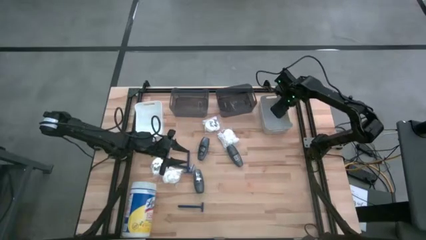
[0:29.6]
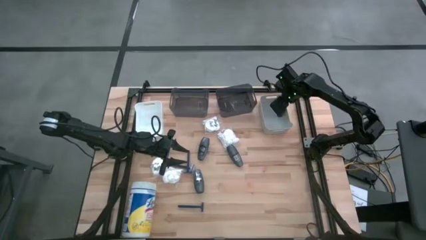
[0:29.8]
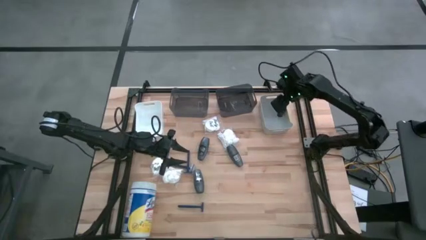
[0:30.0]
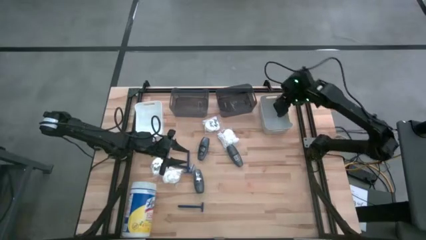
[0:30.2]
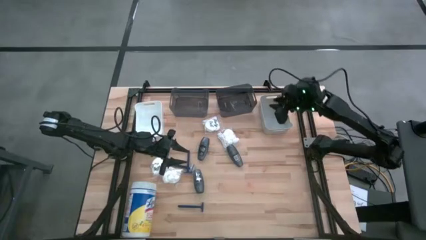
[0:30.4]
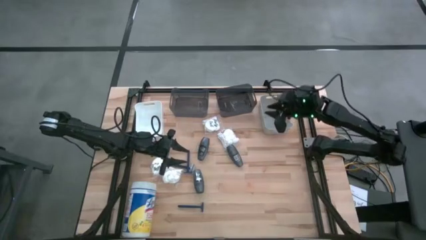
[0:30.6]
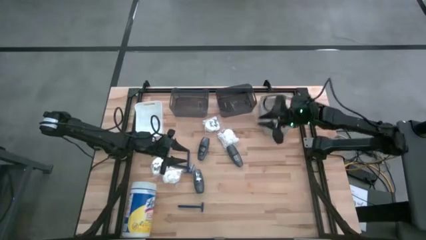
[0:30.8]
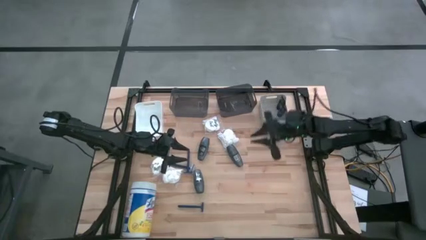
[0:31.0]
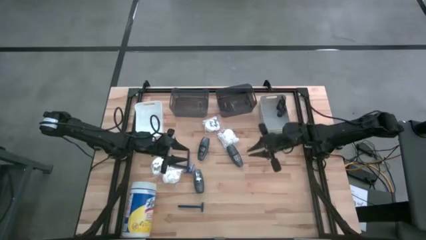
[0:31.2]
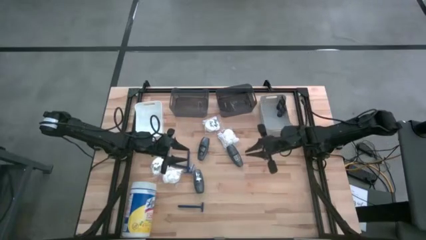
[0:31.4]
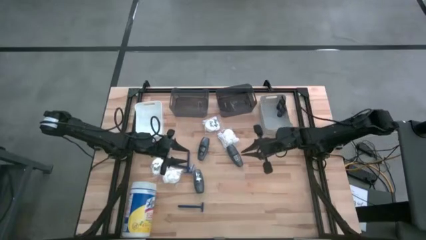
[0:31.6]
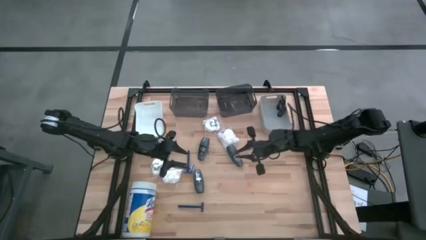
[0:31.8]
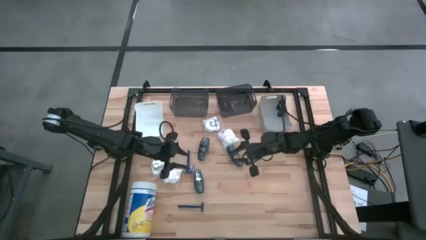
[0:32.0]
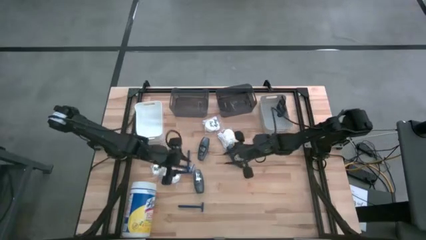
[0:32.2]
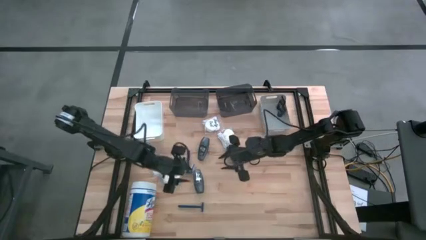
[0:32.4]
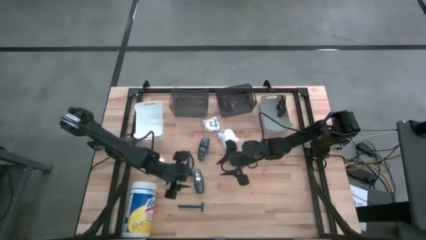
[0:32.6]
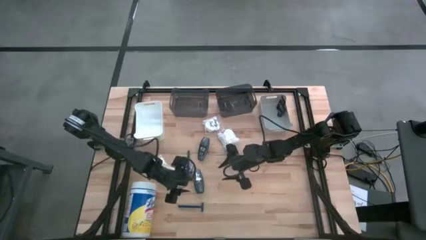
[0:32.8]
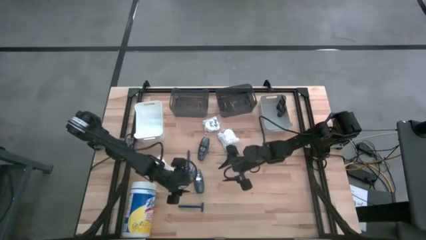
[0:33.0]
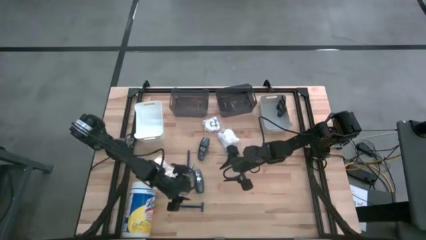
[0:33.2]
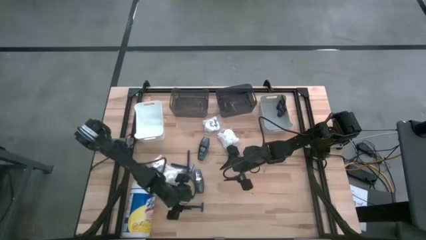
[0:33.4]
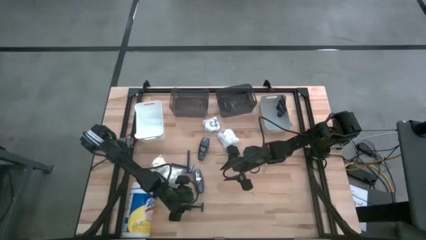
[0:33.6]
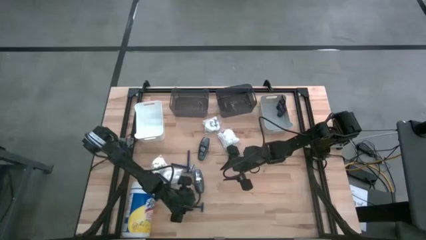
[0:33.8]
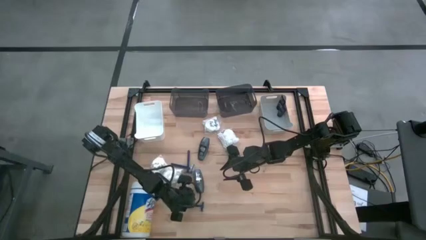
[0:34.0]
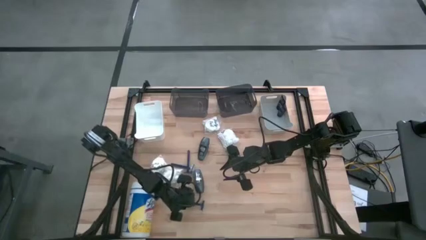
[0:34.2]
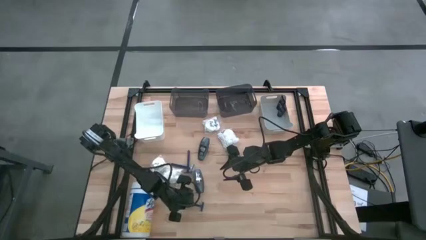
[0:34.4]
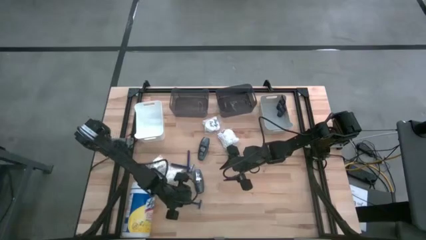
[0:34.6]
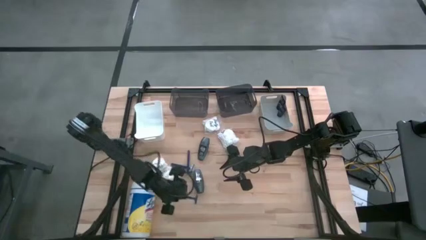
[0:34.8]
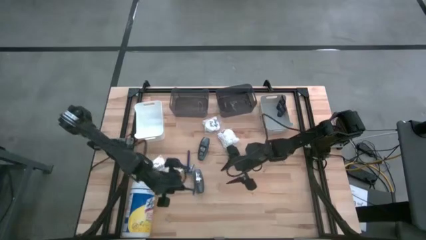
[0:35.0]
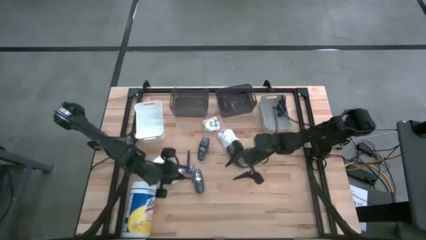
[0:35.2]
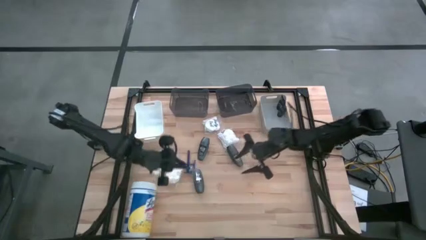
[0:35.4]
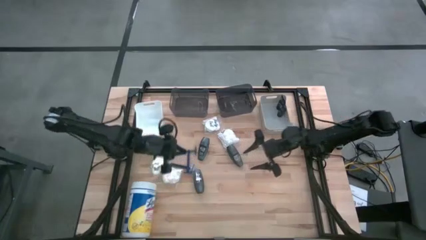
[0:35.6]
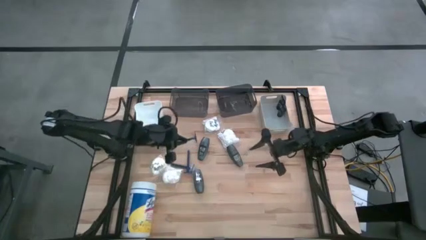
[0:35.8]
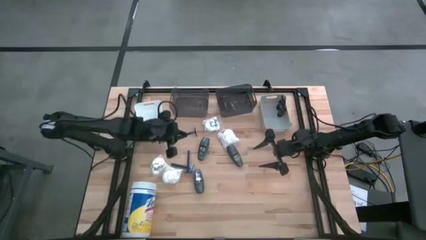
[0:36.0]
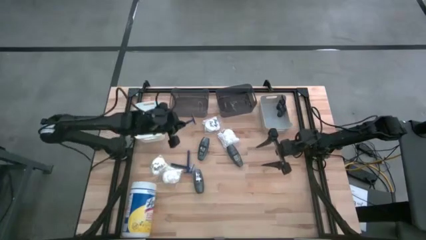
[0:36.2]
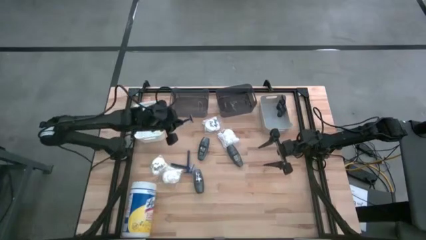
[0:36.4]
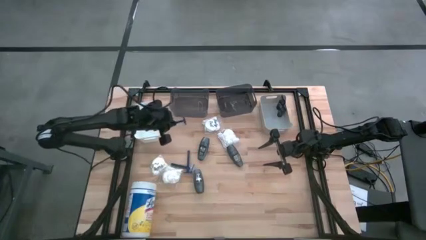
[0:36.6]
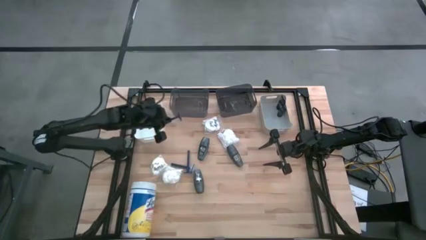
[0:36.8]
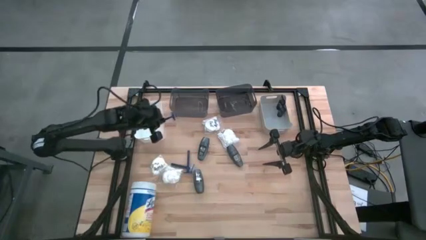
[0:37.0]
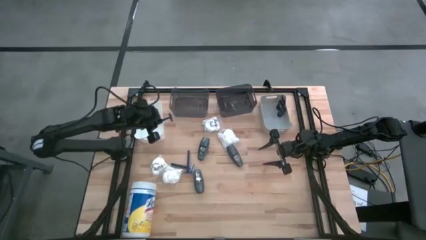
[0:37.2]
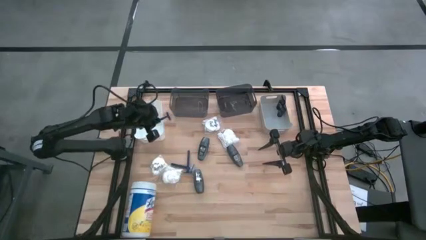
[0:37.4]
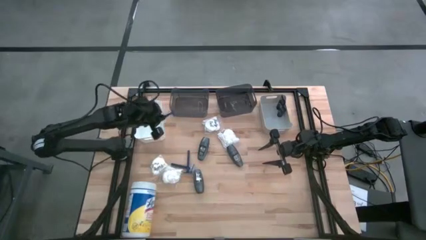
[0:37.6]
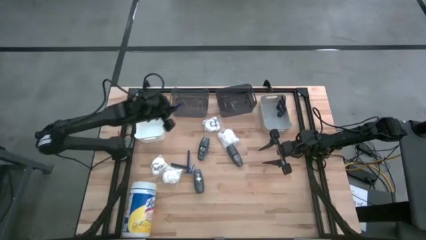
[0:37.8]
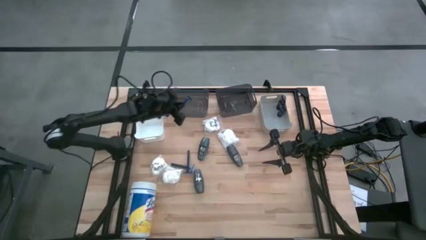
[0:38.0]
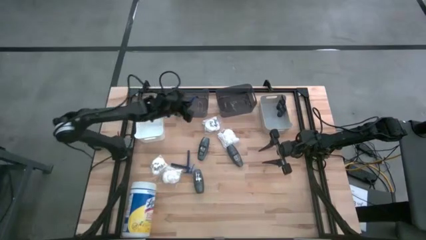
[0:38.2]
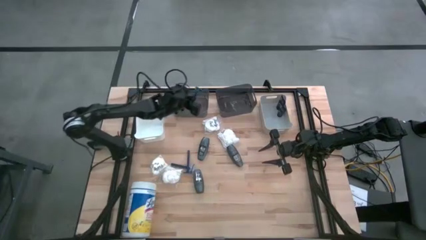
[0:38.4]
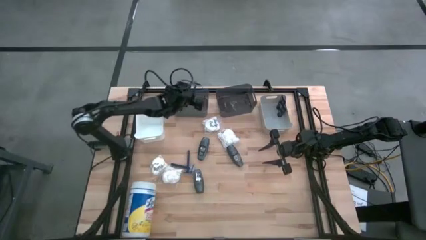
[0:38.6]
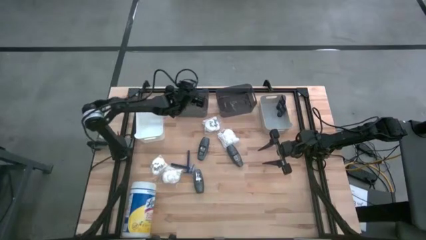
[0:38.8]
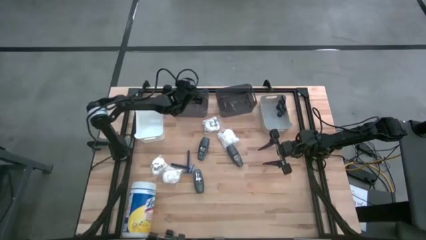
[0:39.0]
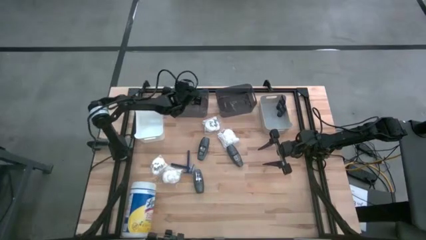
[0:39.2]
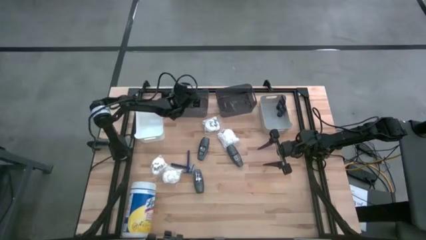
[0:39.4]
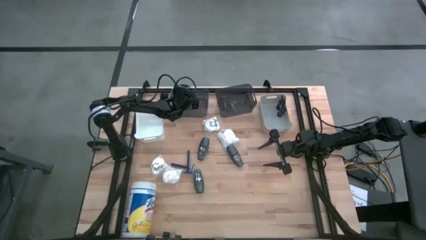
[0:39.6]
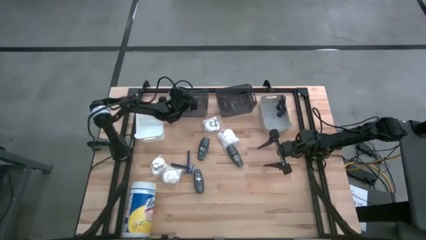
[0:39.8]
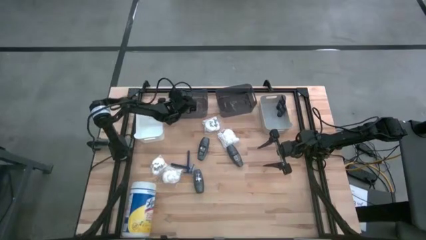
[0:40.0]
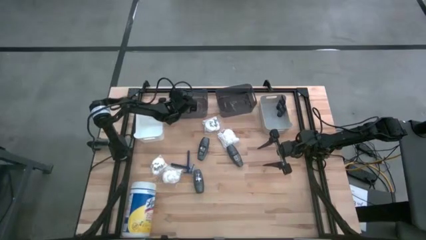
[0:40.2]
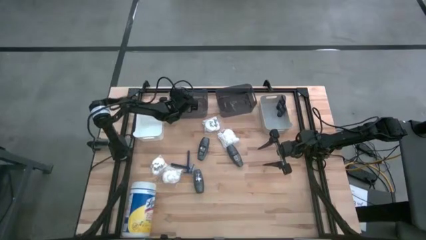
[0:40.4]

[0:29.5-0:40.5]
Task: Pick & Place Travel size toiletries
Put the blue razor into the left black bin
